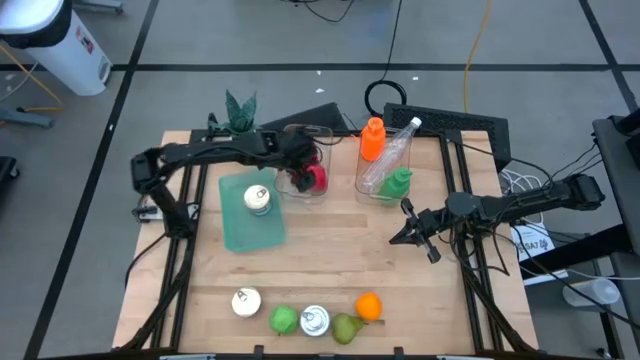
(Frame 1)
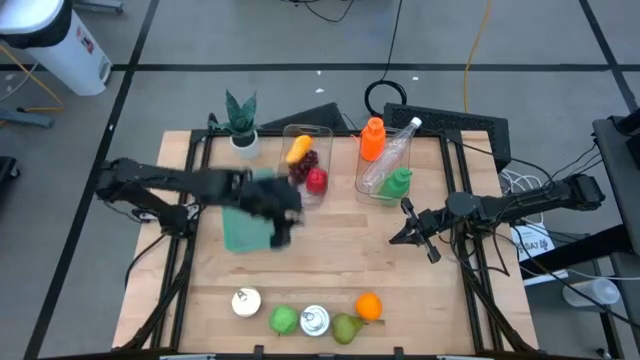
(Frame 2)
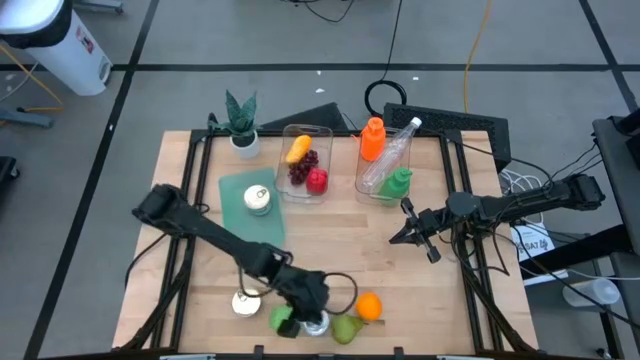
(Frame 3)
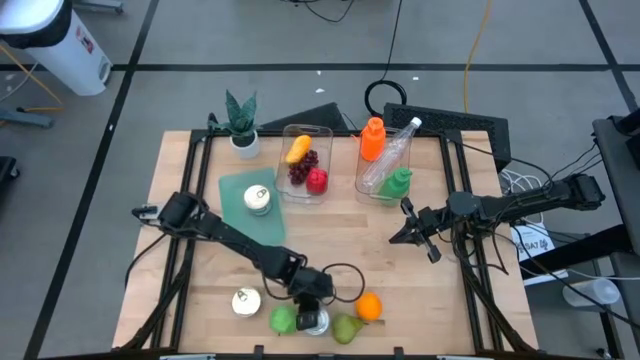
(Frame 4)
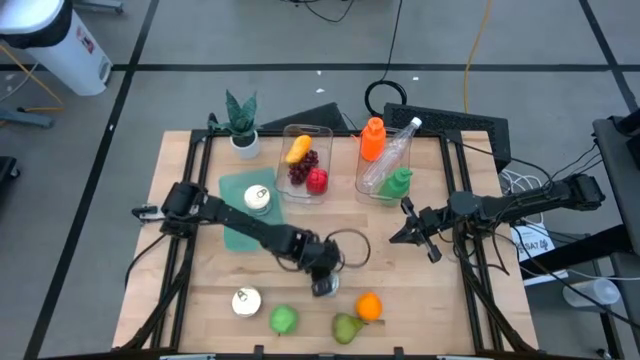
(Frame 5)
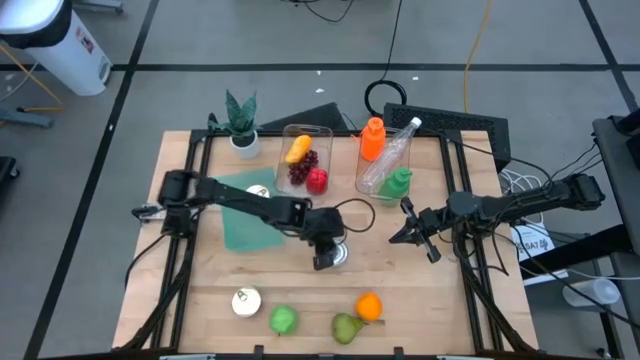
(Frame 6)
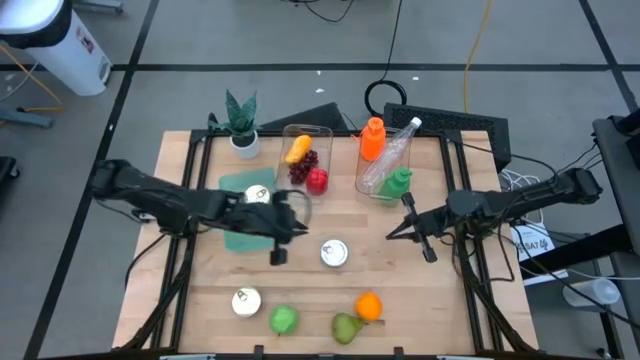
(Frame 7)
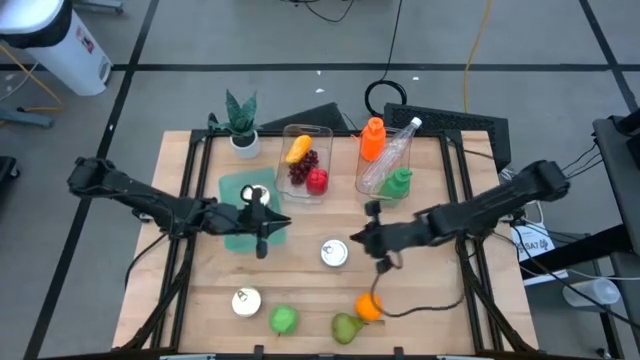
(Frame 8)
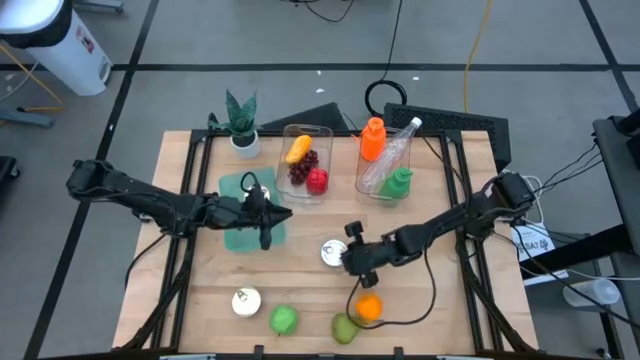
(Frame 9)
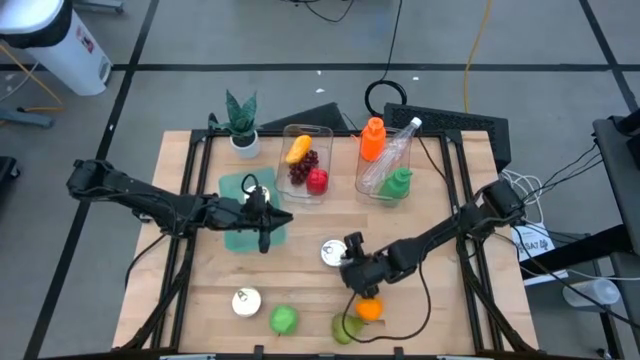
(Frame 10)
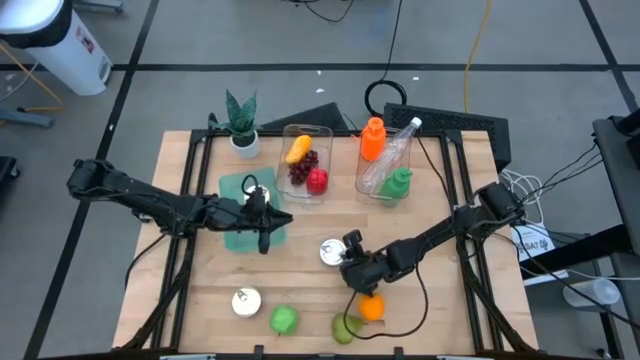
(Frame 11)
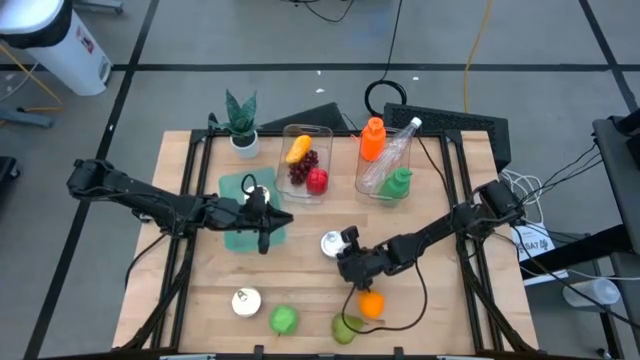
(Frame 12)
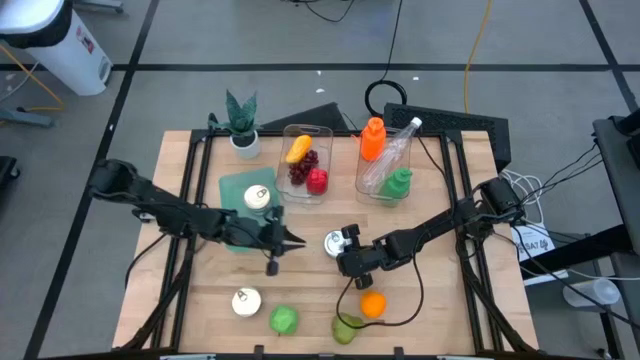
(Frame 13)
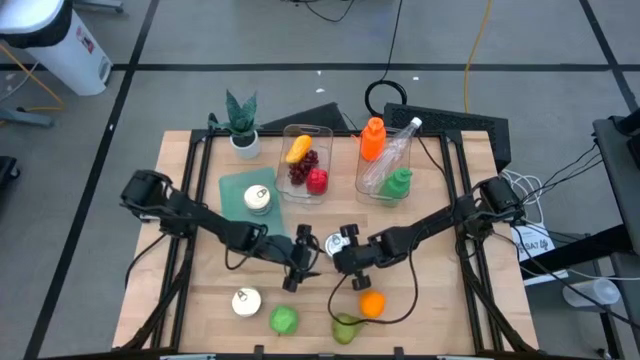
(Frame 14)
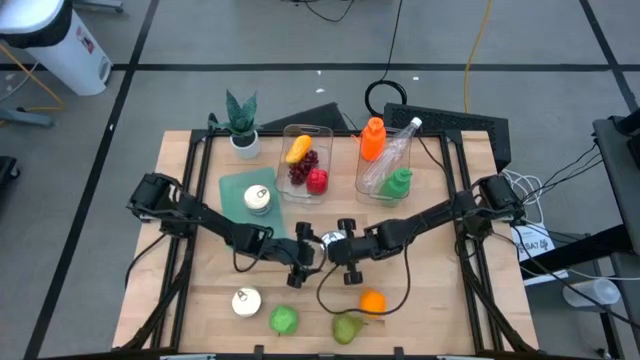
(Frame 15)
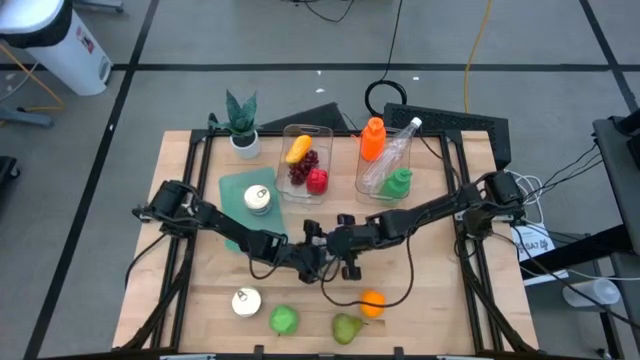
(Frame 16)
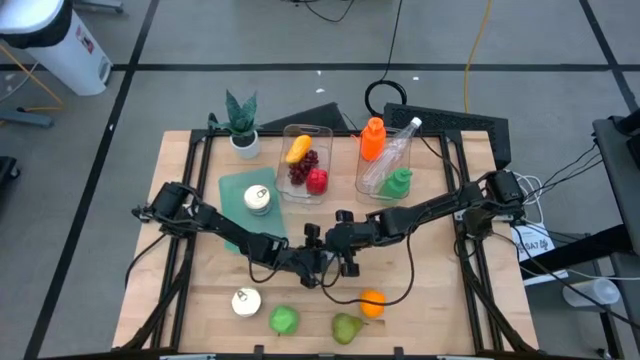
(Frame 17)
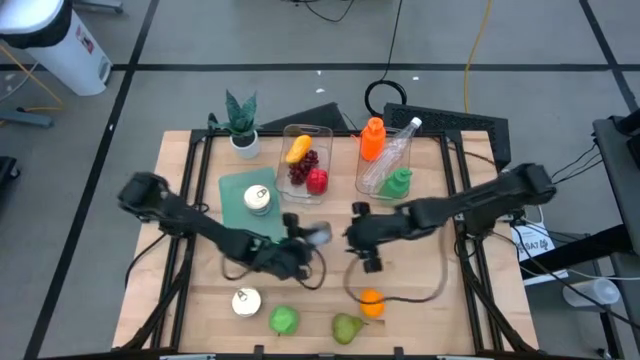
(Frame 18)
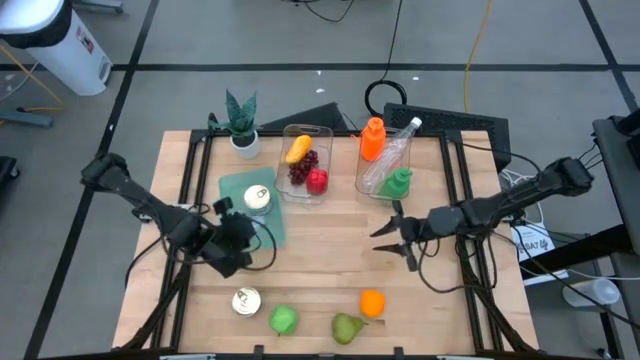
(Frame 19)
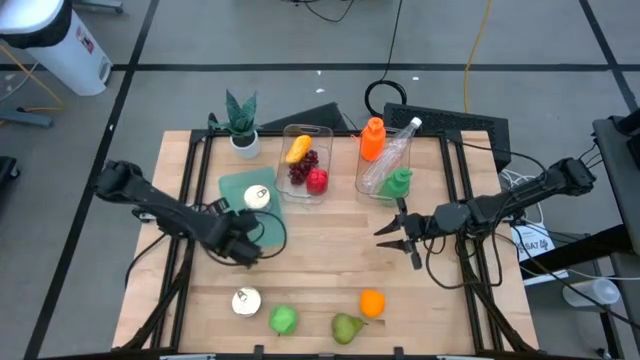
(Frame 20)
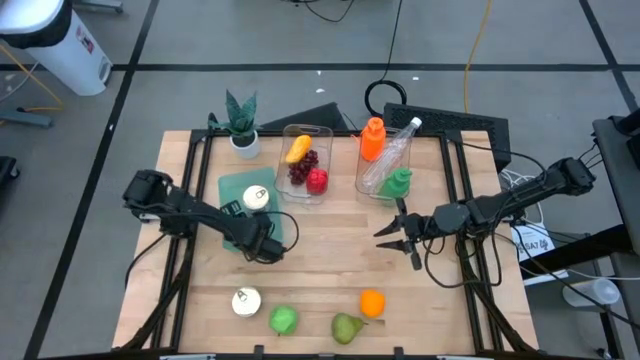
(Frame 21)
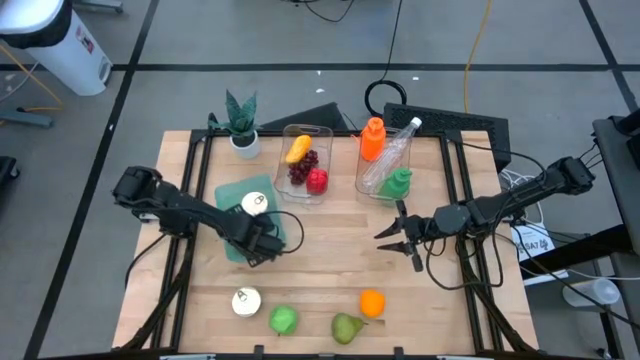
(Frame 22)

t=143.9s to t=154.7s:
Task: Pick & Place Food Item
Put the green tuna can into the blue bin

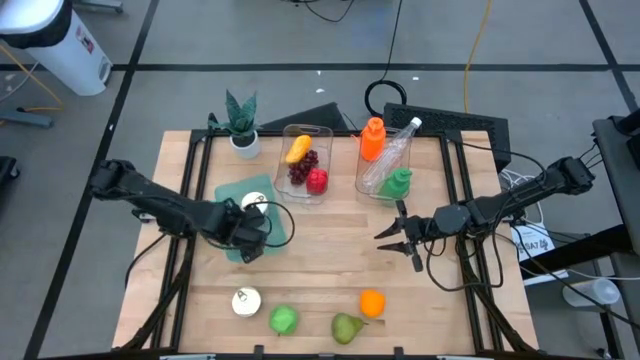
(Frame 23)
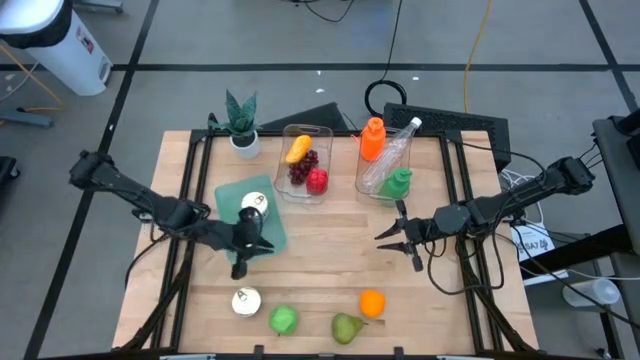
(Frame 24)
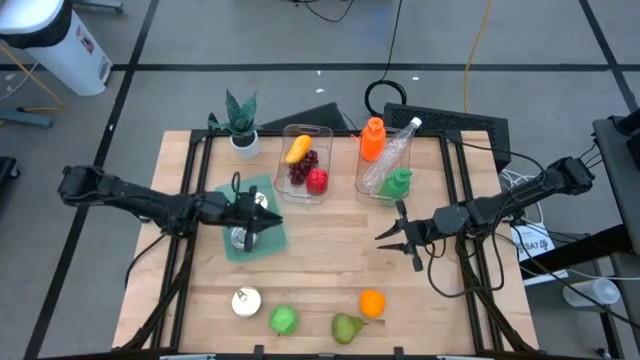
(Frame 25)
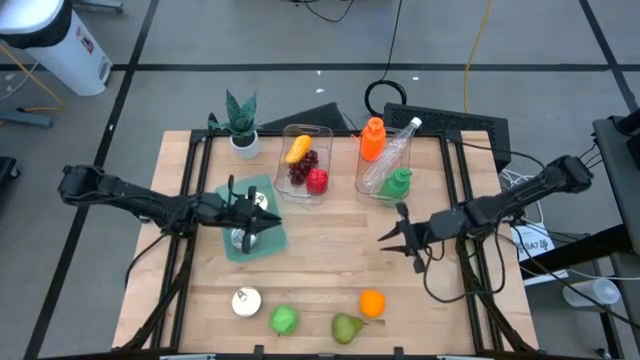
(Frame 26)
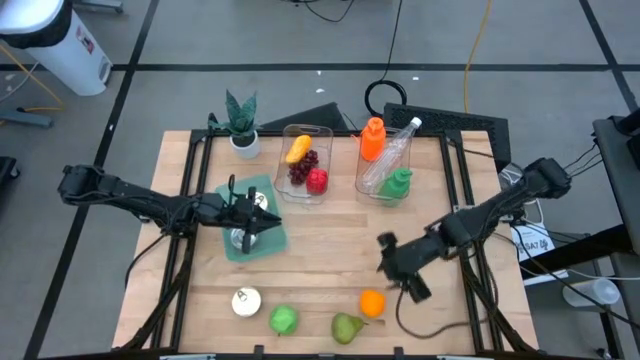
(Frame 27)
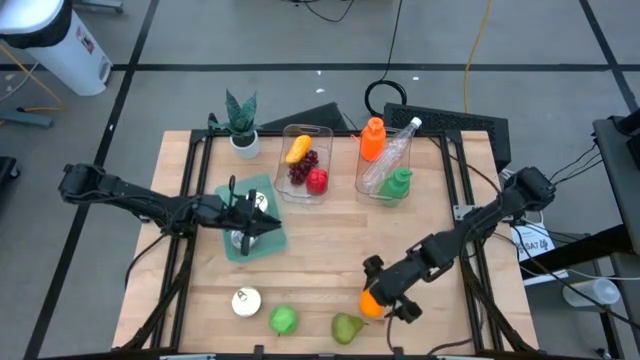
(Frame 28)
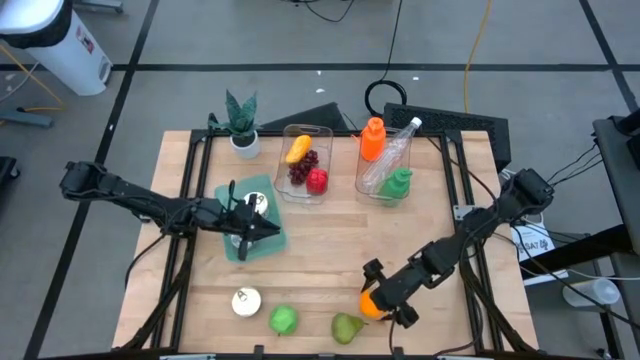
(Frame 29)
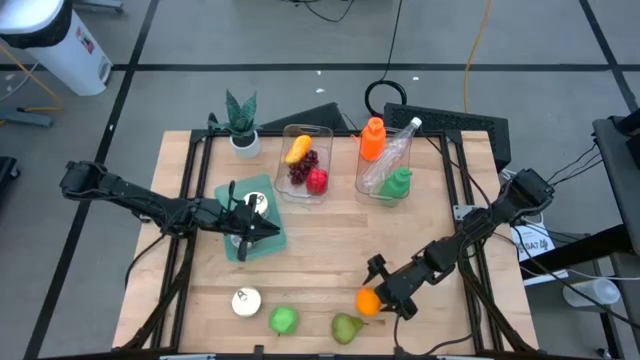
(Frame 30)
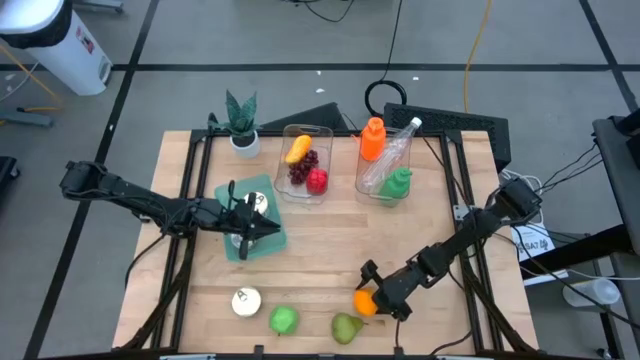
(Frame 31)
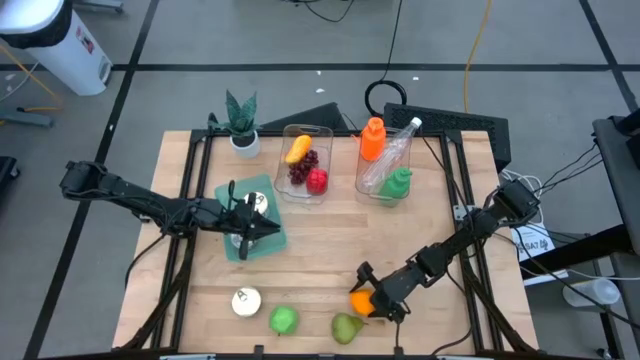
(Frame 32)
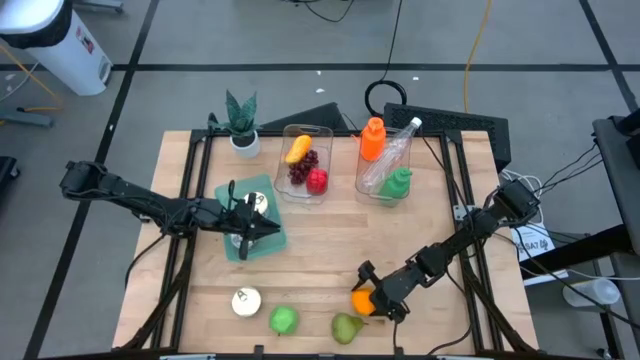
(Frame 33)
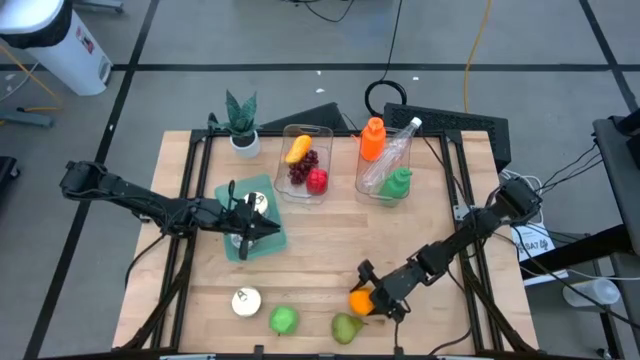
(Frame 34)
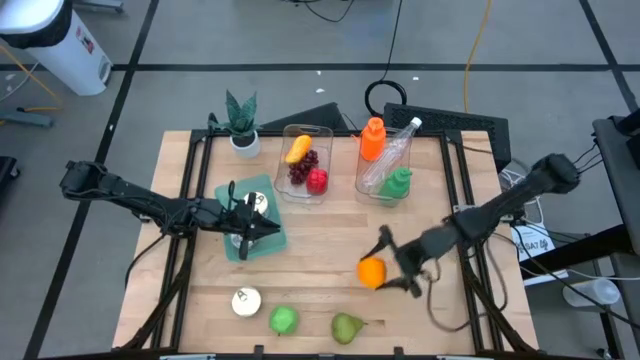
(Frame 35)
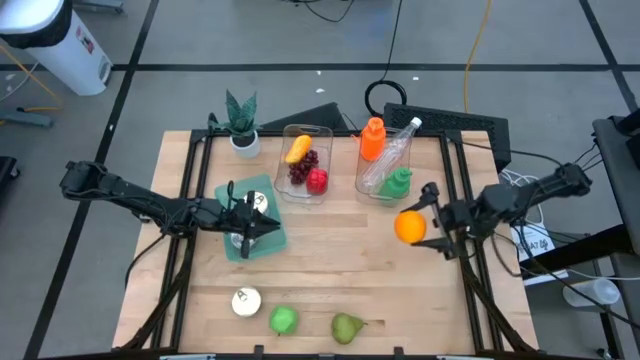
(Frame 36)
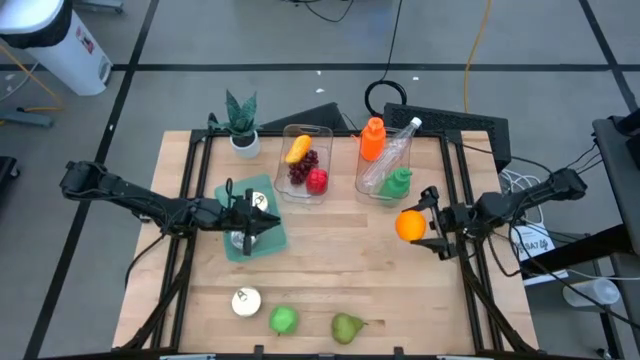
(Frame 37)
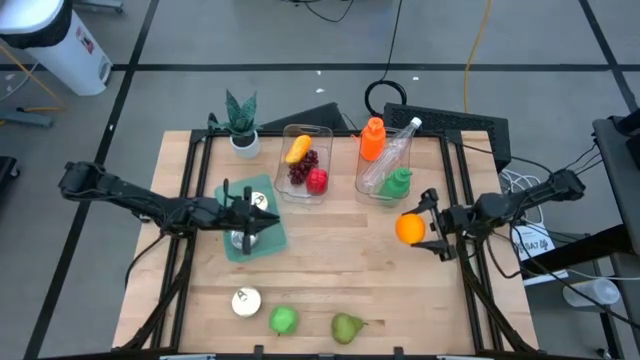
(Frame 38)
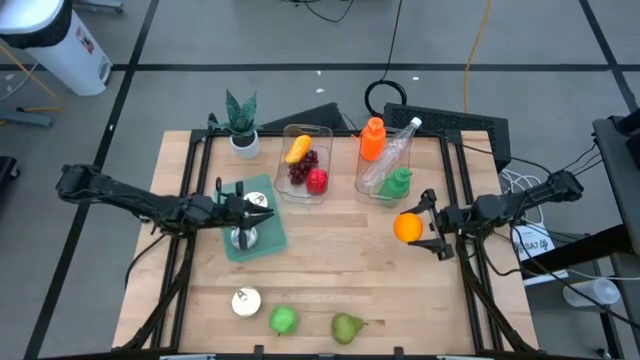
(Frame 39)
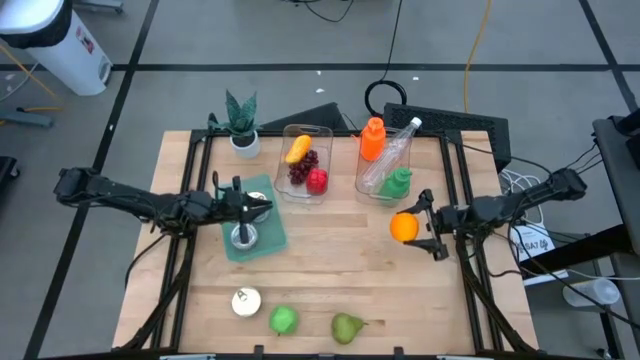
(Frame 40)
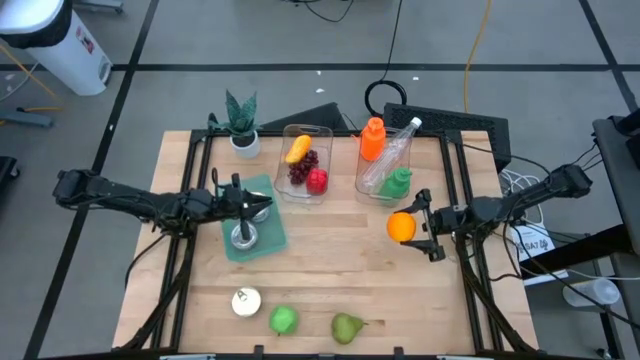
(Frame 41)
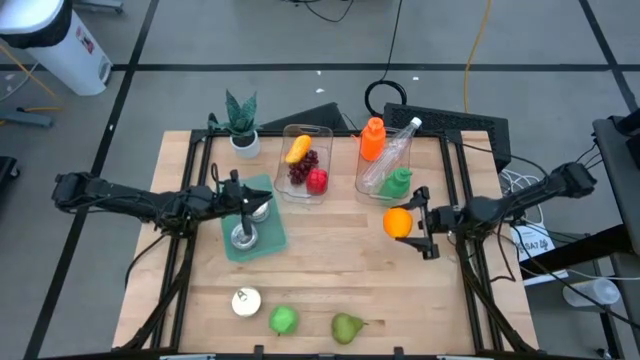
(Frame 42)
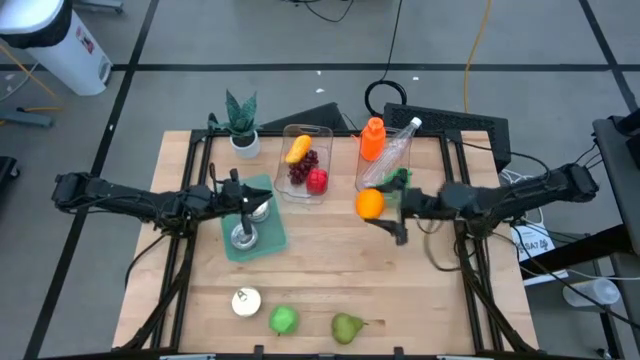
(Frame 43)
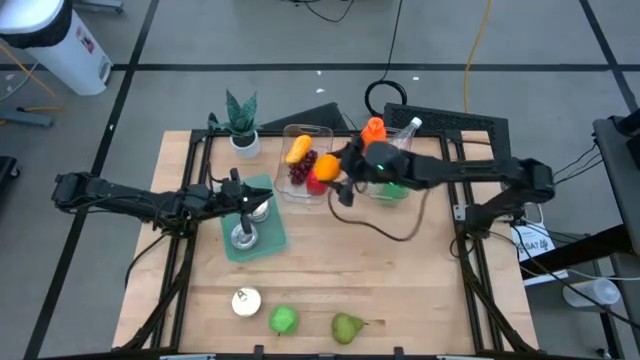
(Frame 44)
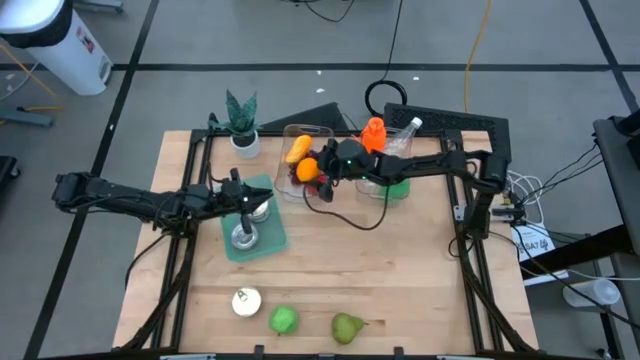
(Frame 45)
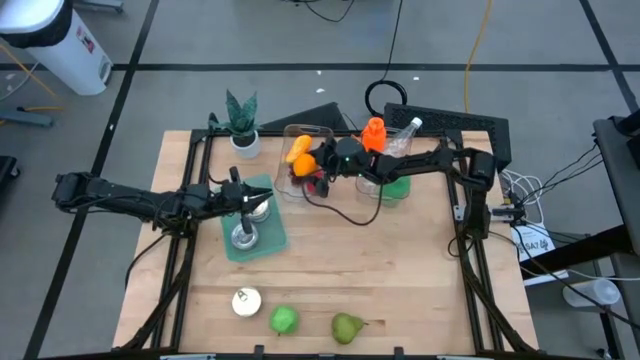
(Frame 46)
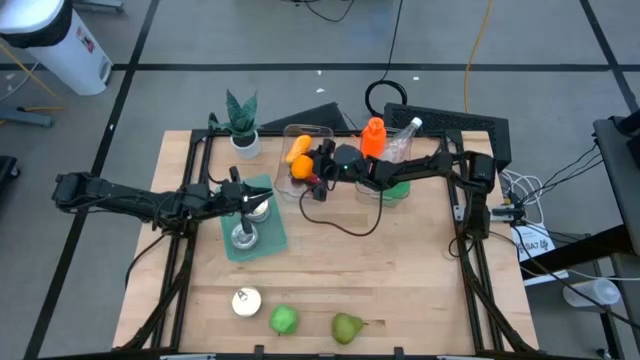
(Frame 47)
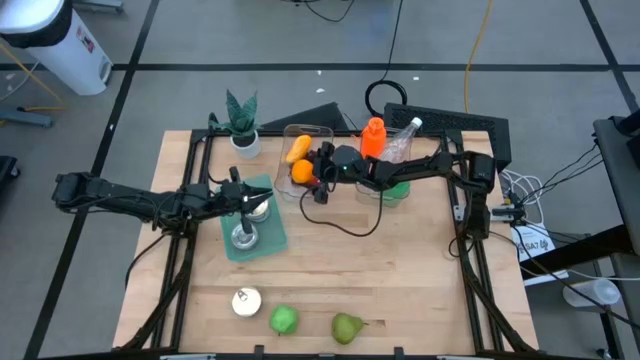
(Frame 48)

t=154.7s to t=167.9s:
Put the orange into the left transparent bin
